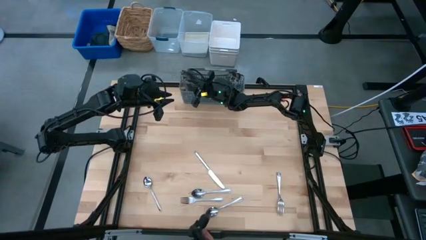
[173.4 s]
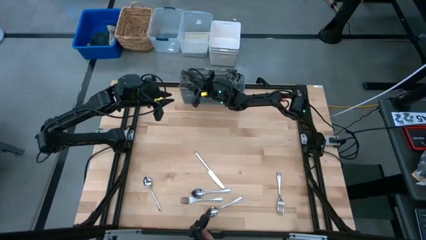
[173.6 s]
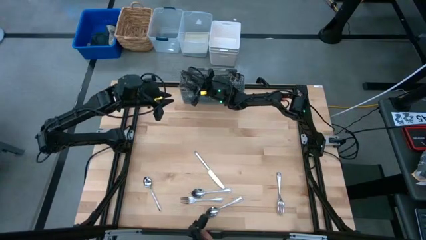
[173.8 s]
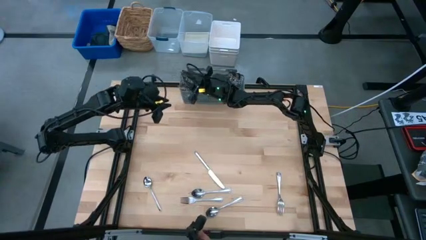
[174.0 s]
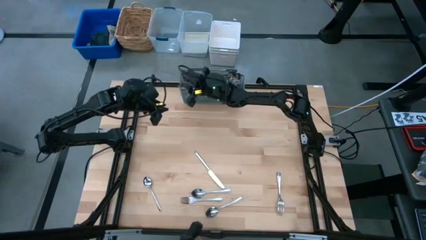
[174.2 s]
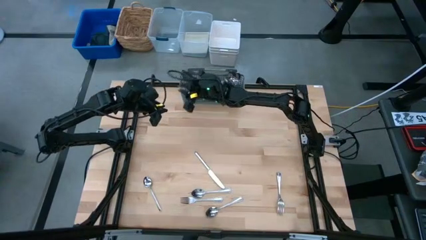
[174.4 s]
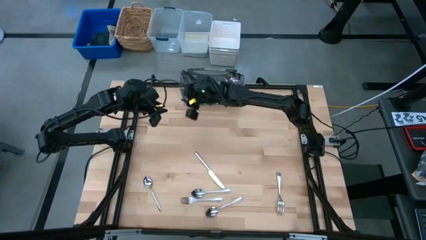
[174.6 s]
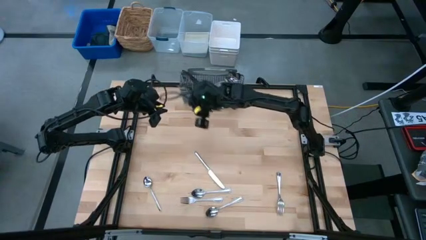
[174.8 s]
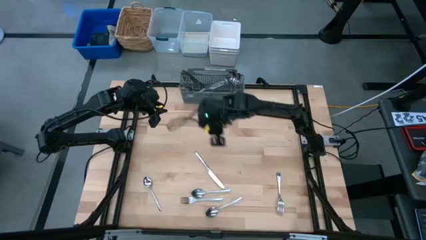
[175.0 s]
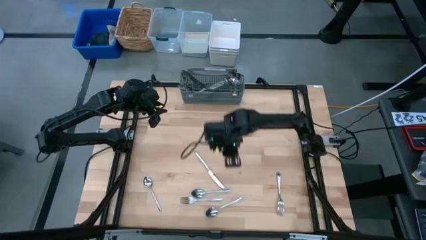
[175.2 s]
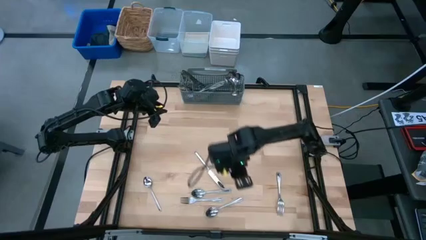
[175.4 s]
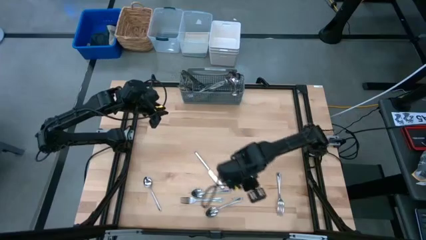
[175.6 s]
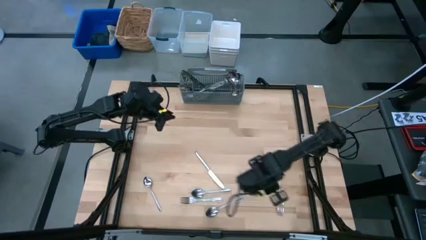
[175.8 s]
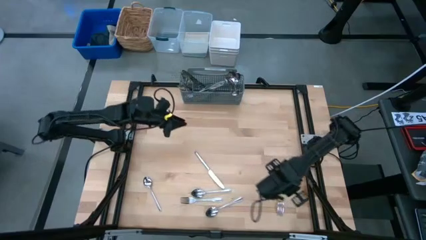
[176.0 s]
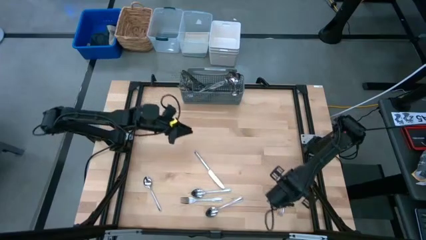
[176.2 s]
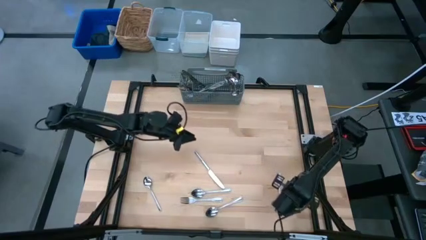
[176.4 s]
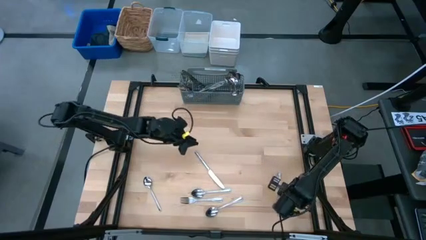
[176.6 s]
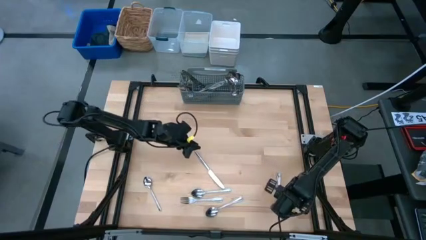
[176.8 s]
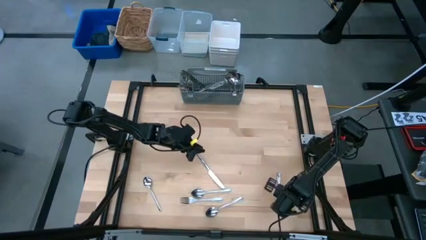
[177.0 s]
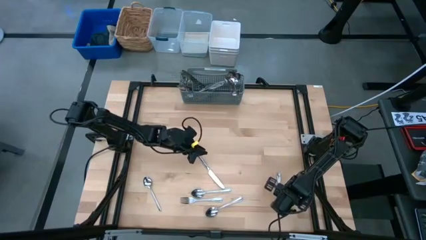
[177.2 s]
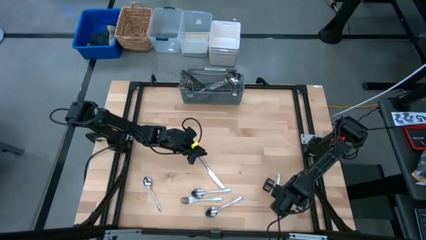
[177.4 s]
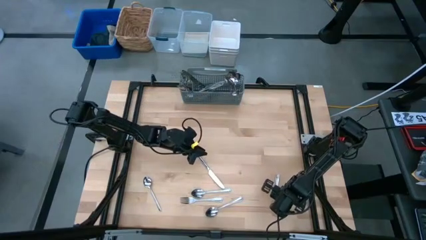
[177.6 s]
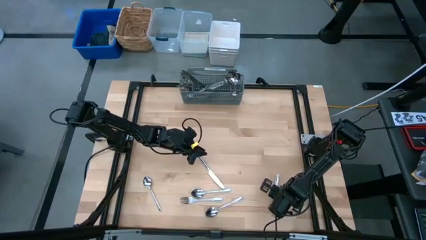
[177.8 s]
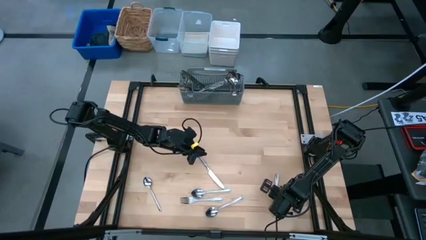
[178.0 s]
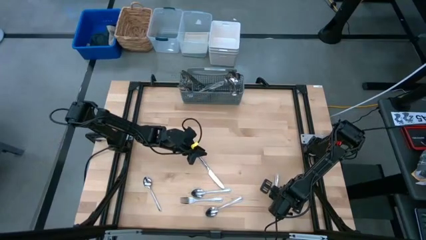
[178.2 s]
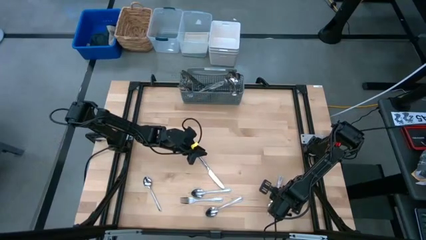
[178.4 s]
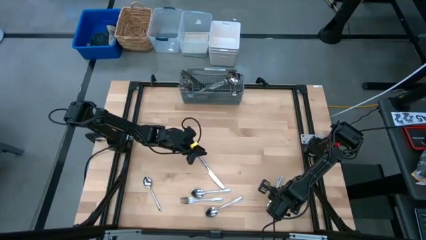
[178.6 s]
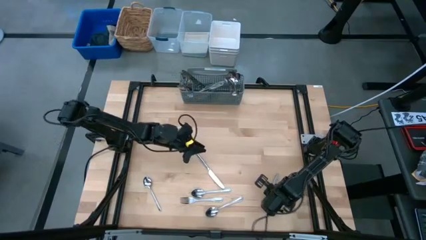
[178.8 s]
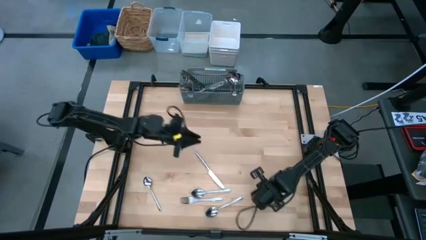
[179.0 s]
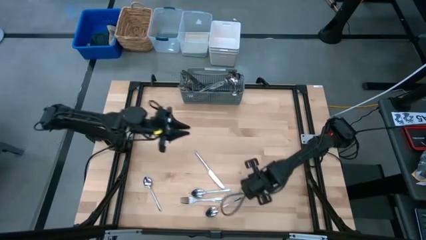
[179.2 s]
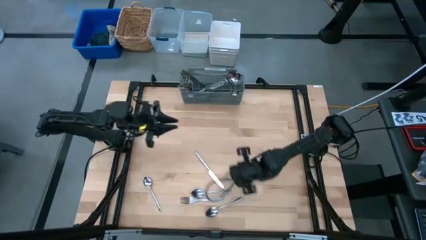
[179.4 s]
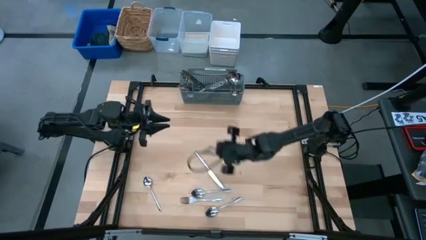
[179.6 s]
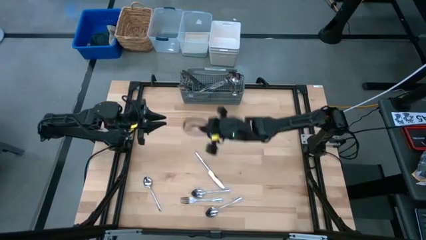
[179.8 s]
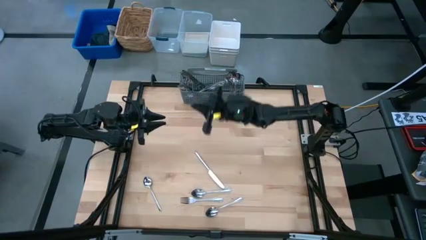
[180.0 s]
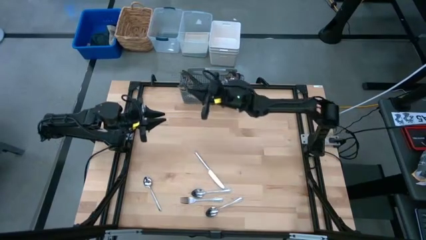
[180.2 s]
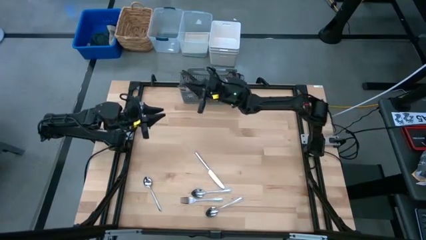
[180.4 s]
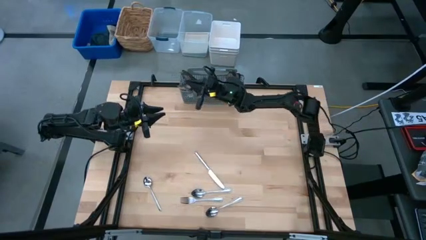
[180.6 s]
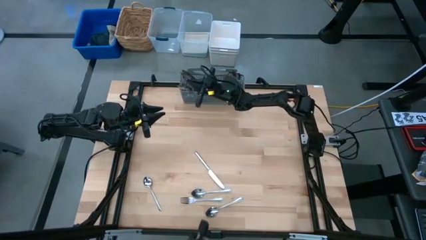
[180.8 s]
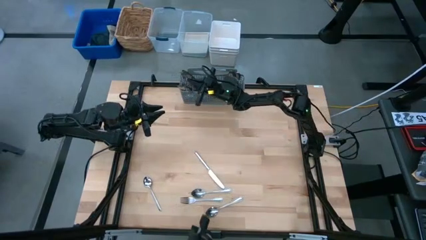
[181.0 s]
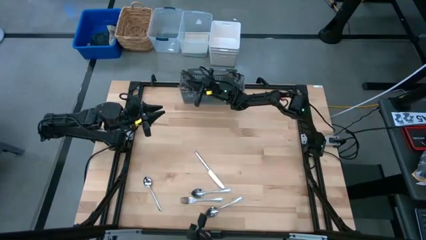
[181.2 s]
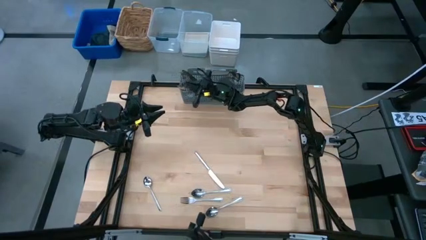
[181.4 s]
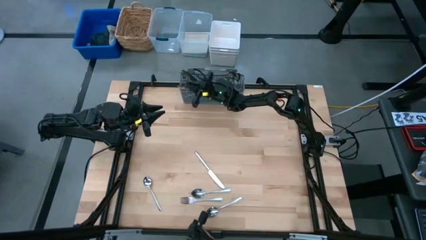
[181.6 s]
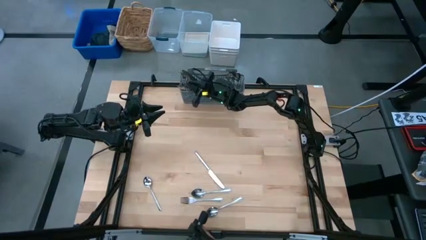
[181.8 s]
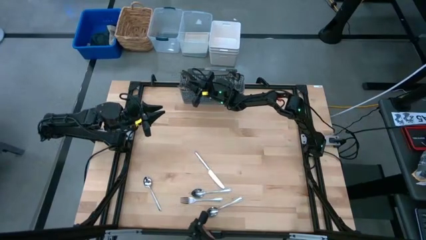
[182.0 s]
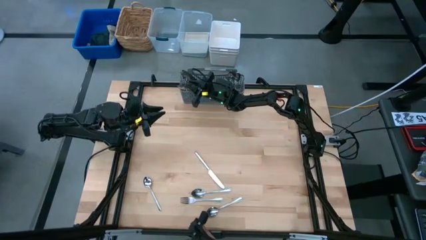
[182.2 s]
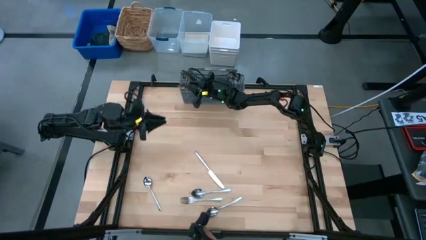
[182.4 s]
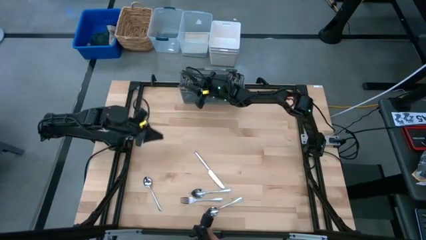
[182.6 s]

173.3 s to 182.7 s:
Put the silver fork into the dishwasher utensil holder

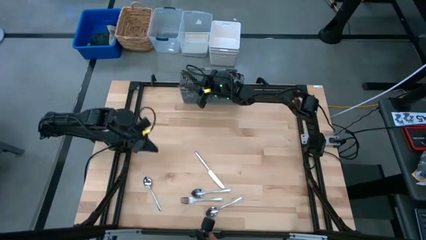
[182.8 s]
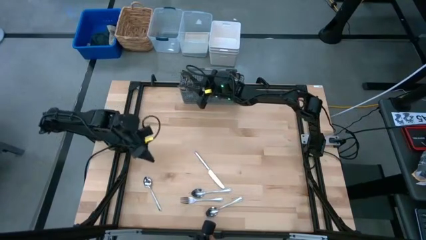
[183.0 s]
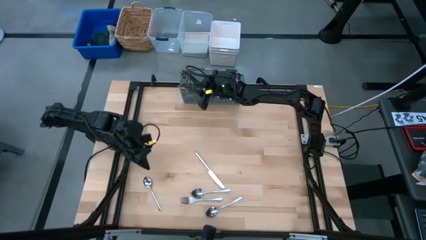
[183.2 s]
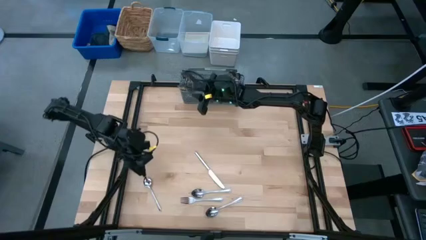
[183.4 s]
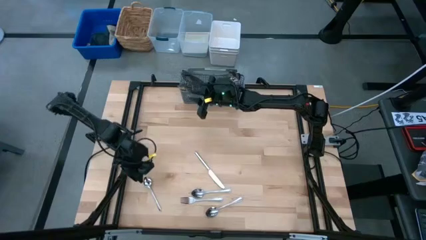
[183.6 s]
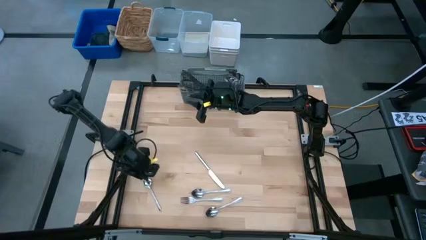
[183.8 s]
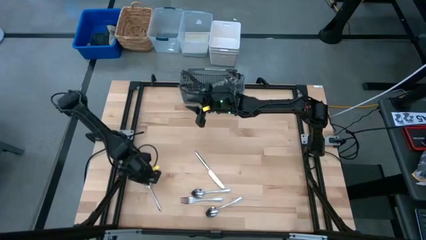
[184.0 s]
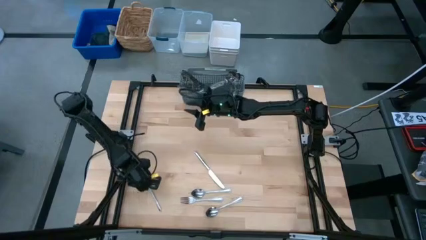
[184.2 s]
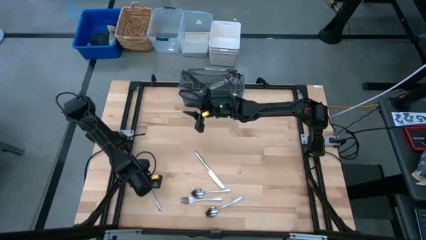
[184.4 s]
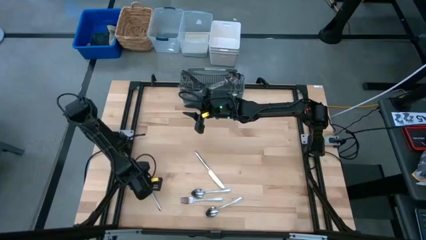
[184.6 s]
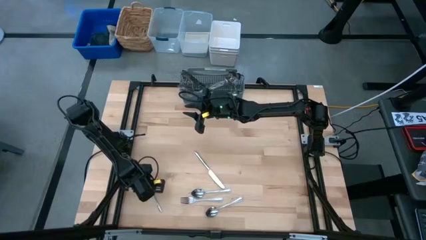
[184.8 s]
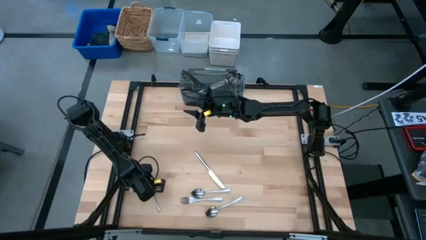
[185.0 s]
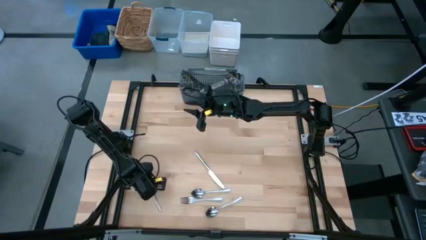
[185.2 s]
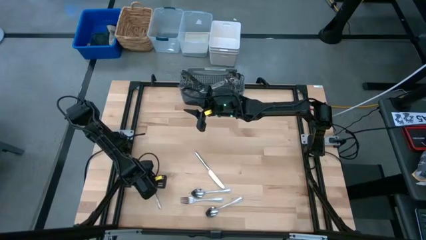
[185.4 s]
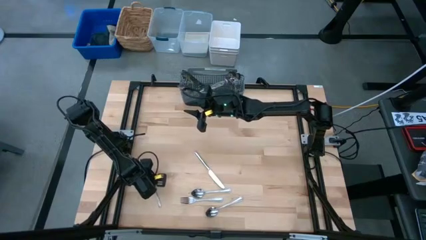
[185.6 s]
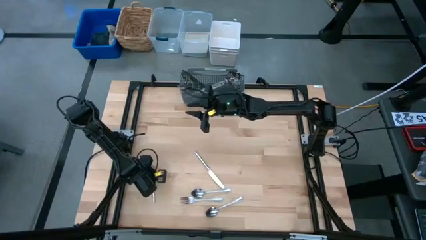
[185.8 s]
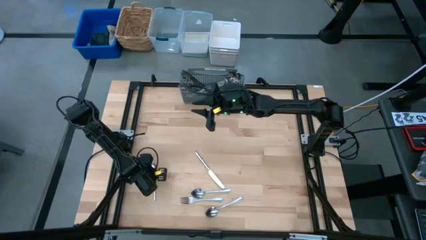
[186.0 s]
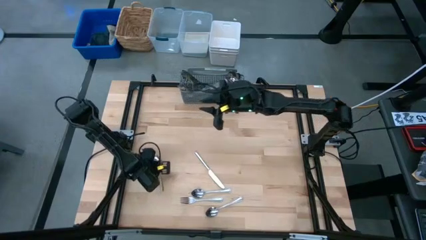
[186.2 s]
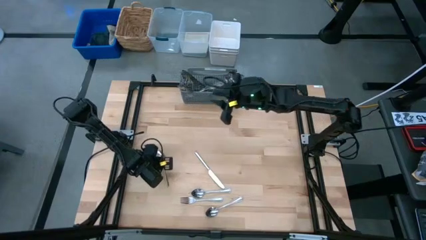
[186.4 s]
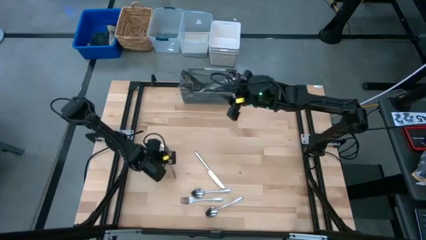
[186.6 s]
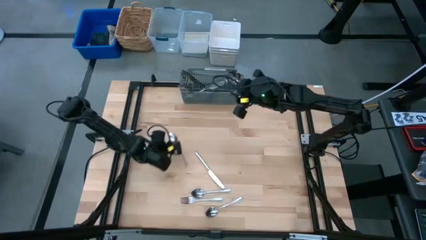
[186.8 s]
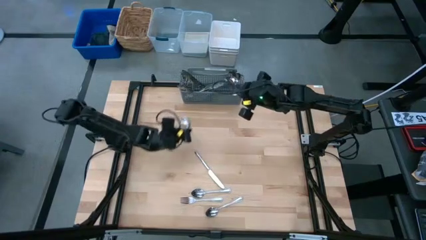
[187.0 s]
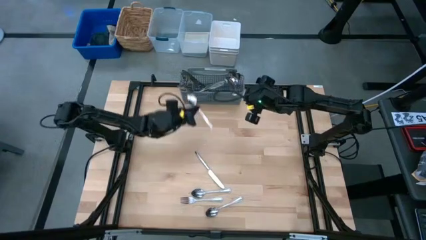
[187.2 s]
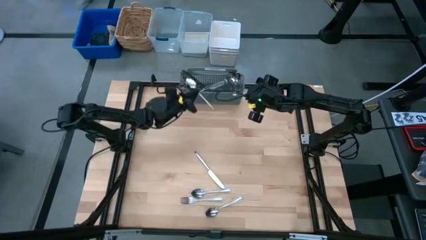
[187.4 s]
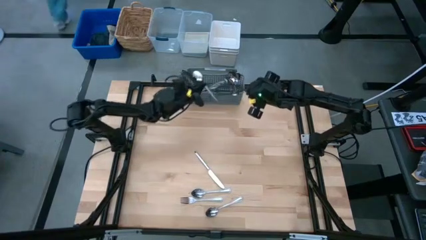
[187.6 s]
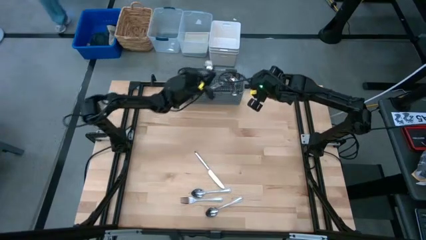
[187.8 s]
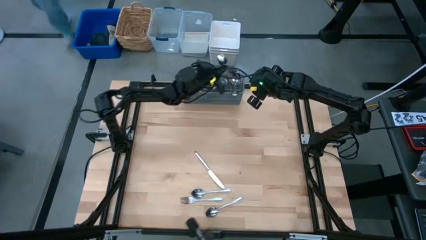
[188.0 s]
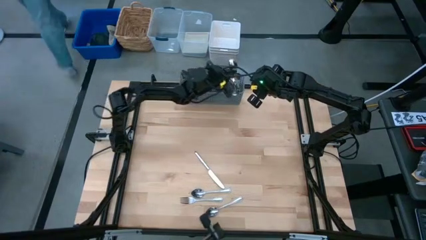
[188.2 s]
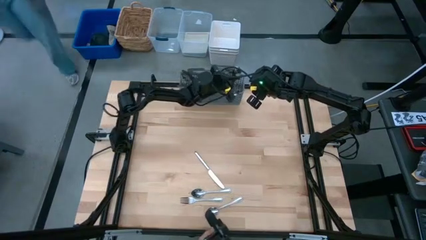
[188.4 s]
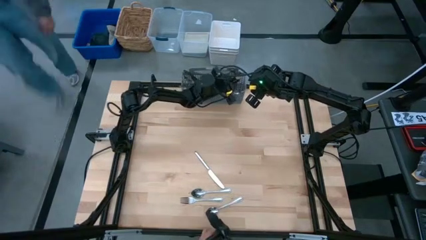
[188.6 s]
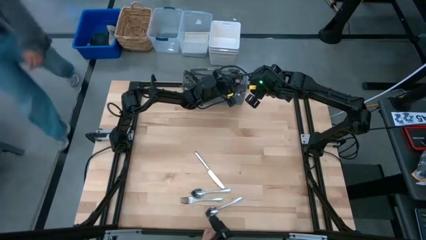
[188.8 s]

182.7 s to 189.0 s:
Put the silver spoon into the dishwasher utensil holder
